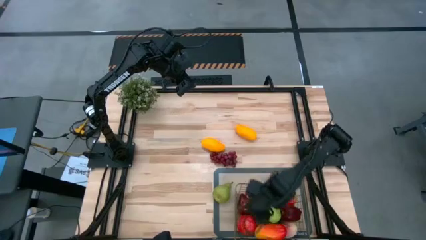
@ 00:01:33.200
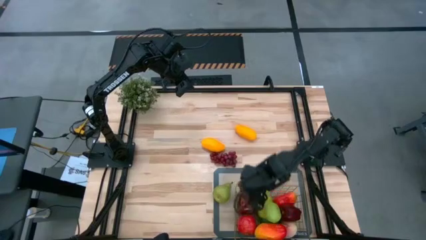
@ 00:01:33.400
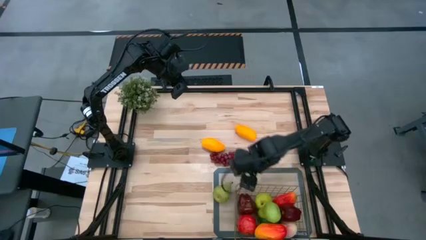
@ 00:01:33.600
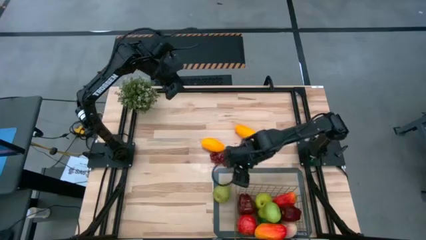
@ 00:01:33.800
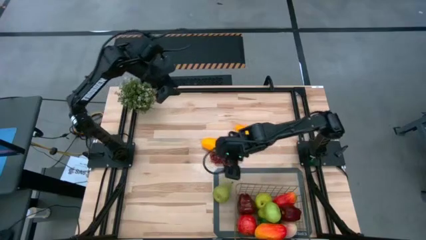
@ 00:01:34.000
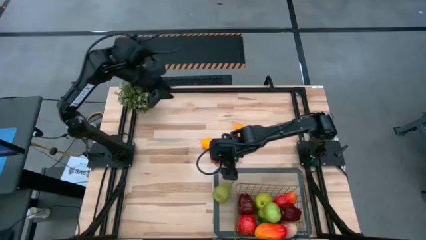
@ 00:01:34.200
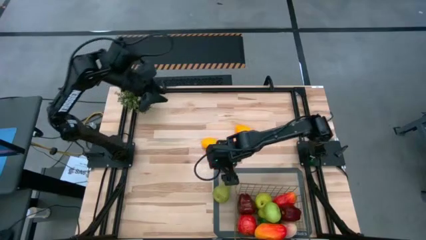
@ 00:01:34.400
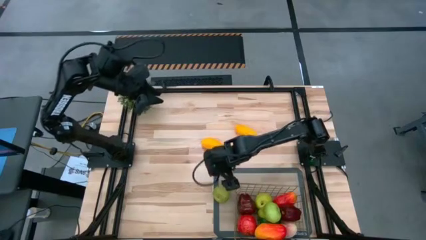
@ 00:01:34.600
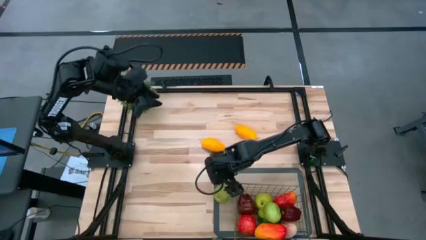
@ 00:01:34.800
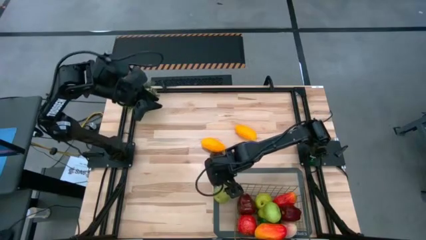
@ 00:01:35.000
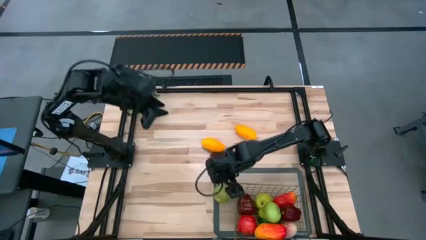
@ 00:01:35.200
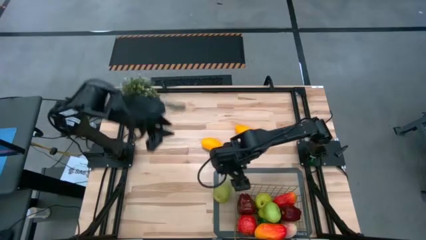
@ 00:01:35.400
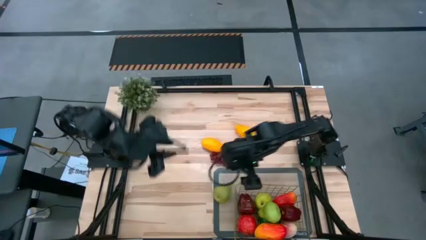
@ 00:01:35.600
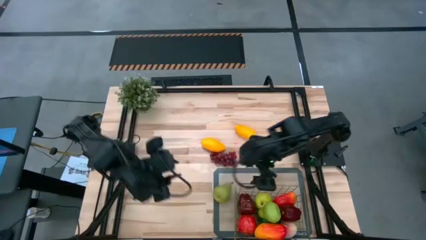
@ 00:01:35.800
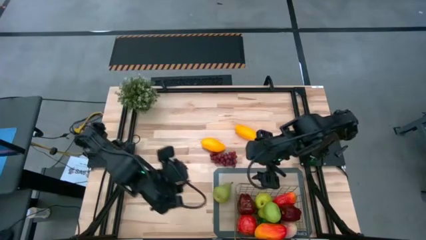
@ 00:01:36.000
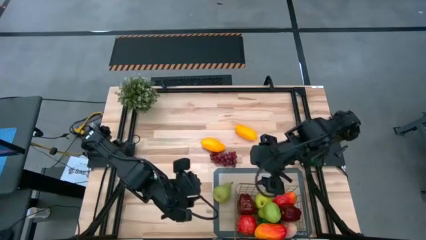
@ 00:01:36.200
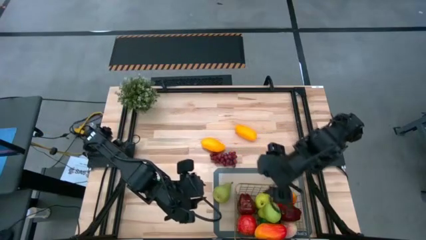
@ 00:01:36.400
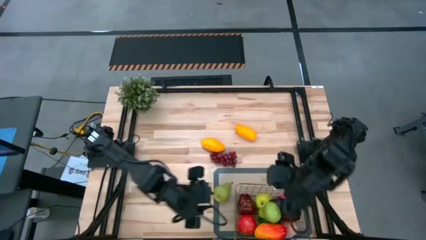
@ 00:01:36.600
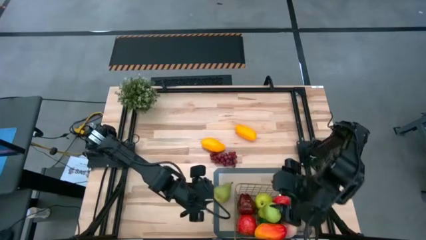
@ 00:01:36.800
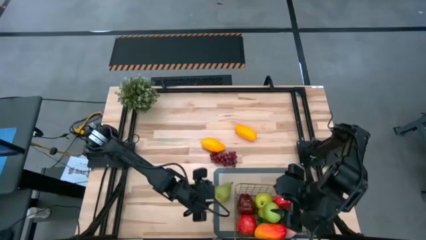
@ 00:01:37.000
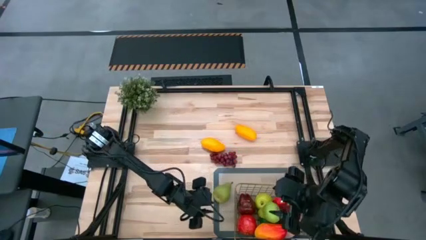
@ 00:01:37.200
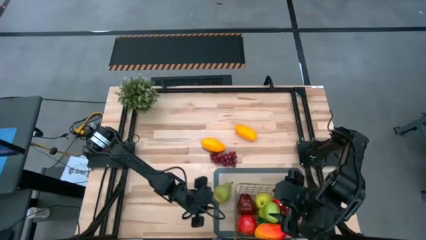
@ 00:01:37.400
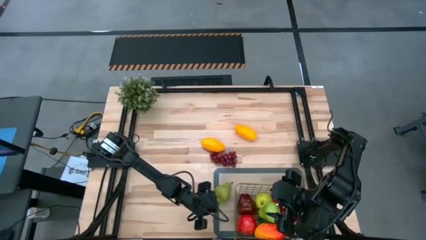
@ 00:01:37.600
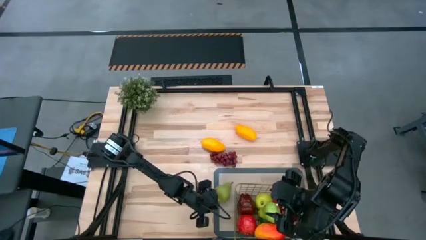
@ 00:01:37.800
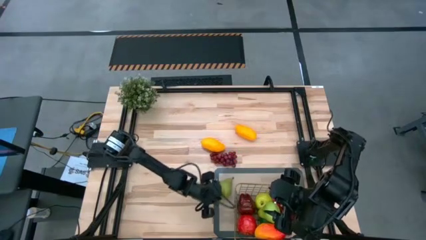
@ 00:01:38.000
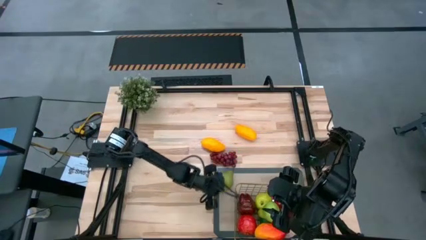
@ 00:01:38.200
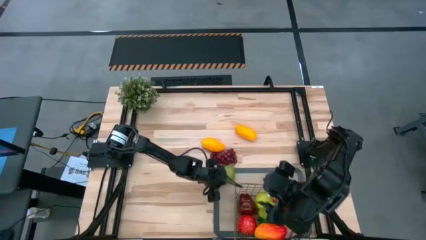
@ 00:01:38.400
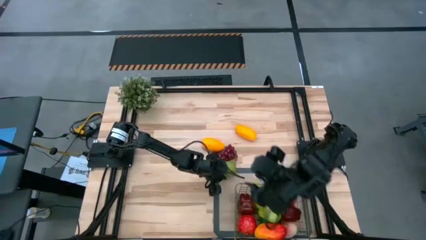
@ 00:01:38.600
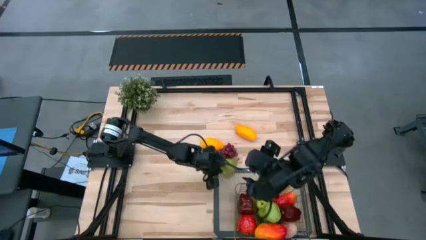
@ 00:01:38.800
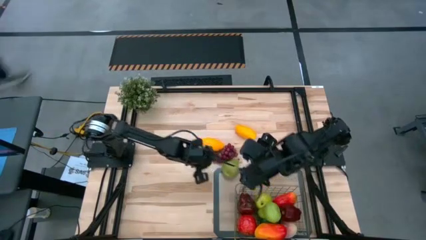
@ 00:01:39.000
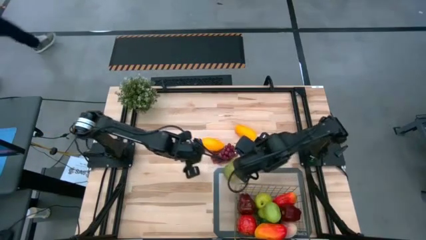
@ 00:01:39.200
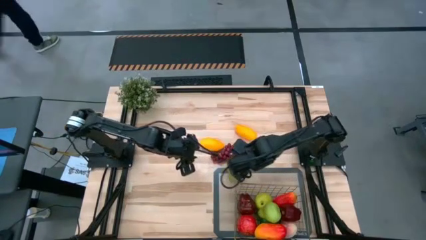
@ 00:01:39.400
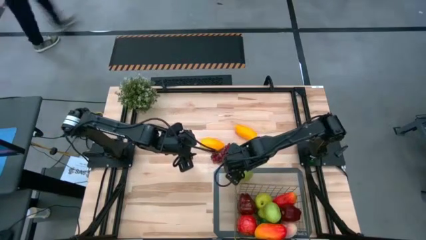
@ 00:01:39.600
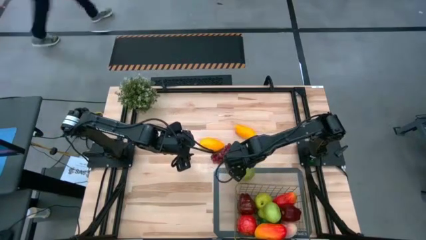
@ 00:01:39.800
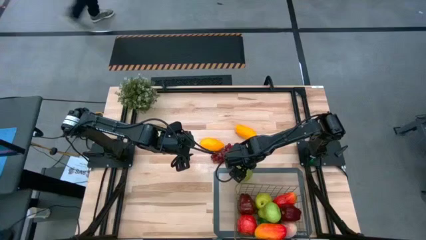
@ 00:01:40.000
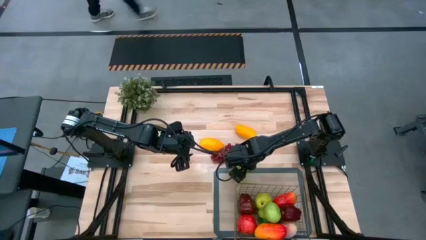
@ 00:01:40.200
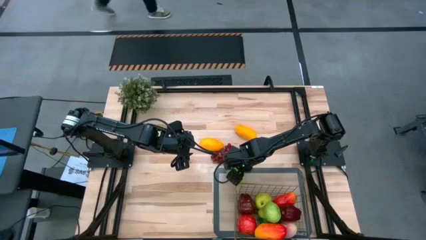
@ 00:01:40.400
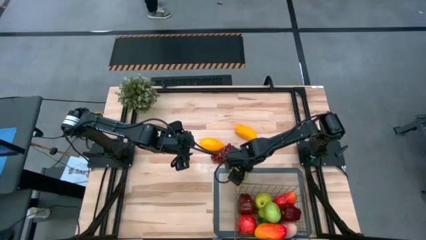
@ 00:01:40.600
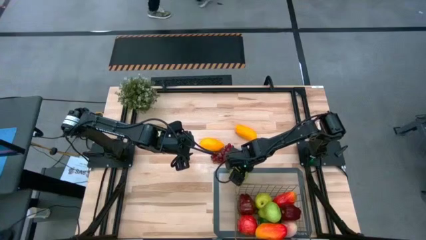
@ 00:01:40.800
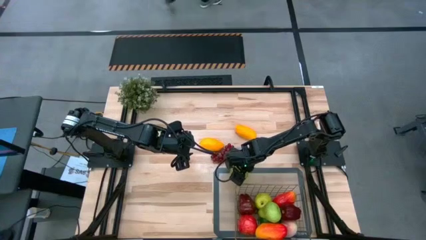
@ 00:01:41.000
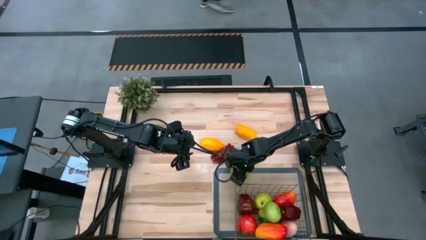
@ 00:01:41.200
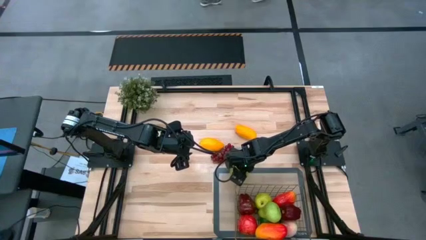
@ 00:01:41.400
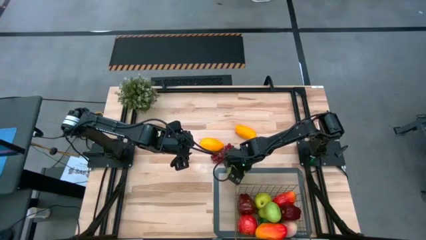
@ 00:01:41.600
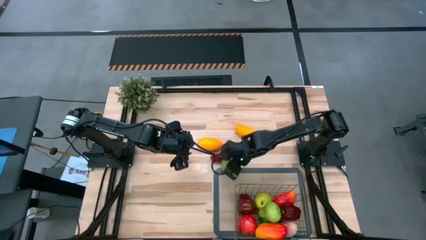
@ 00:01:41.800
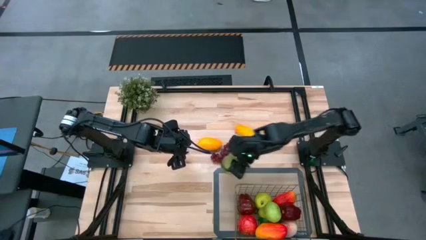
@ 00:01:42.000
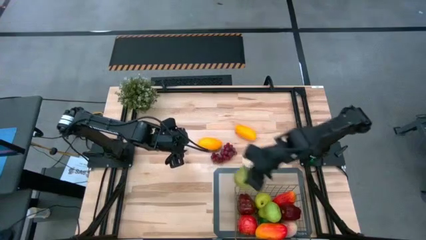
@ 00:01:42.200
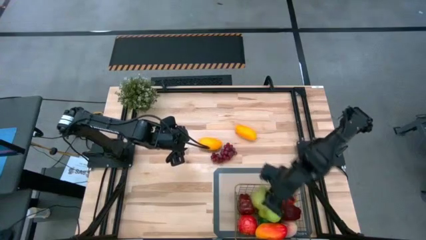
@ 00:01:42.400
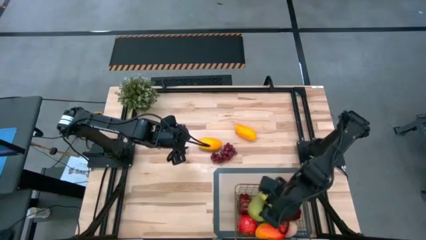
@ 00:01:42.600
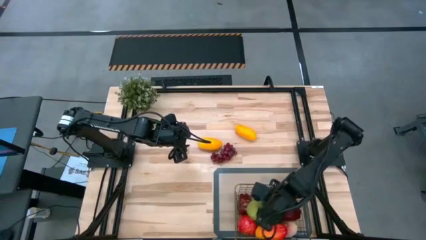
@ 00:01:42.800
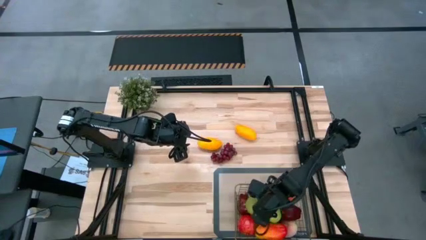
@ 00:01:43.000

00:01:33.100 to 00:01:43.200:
Task: Build produce basket
Put the pear into the wire basket

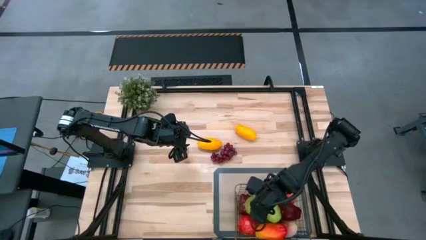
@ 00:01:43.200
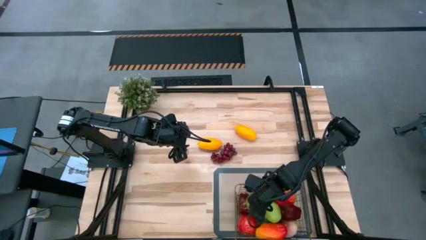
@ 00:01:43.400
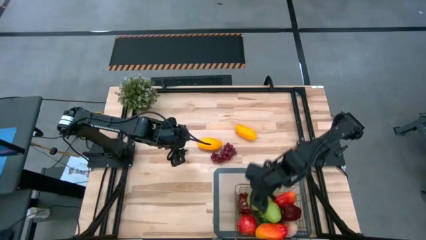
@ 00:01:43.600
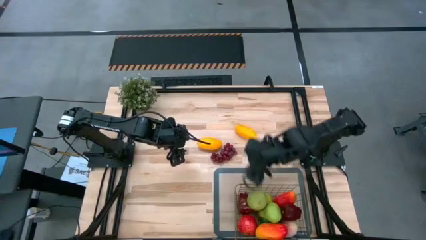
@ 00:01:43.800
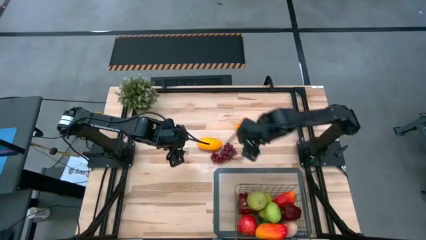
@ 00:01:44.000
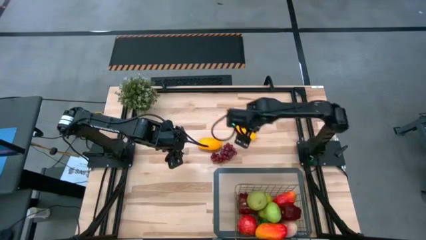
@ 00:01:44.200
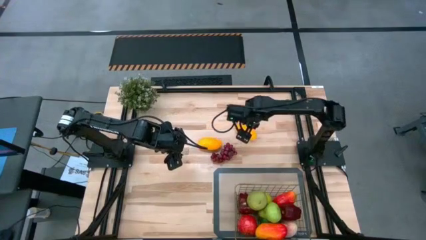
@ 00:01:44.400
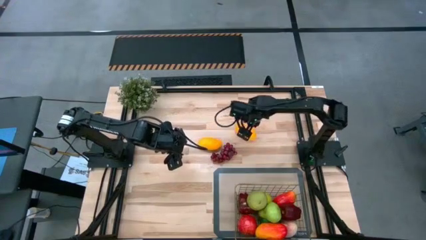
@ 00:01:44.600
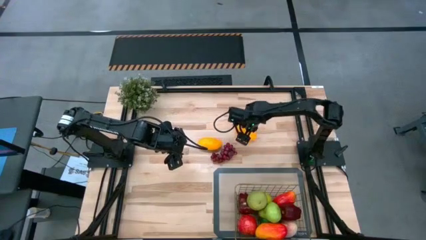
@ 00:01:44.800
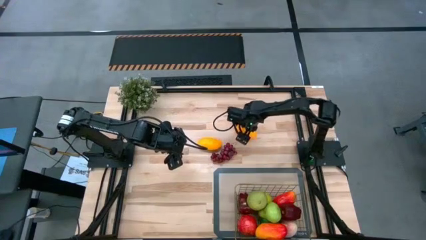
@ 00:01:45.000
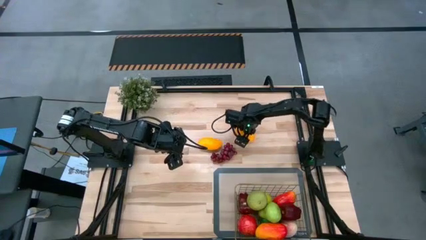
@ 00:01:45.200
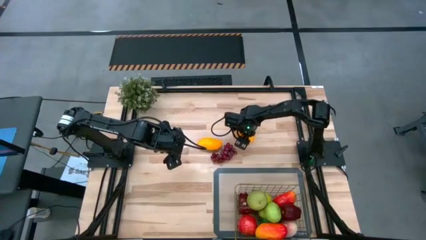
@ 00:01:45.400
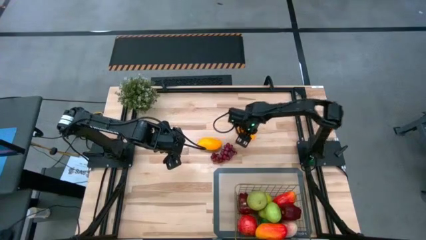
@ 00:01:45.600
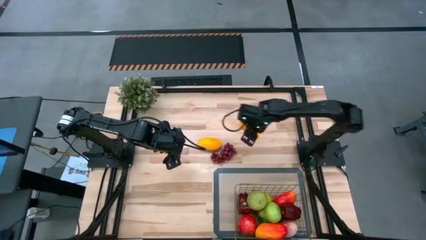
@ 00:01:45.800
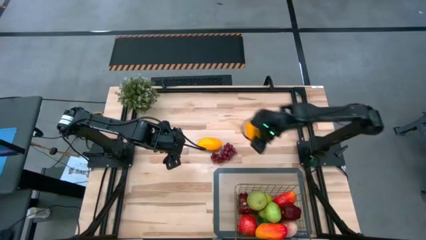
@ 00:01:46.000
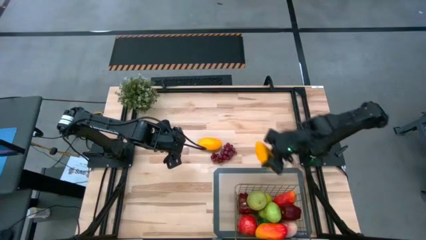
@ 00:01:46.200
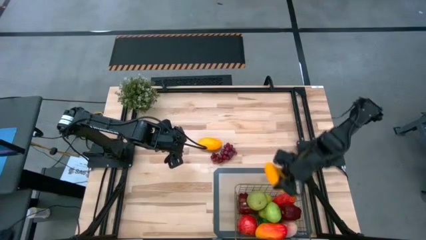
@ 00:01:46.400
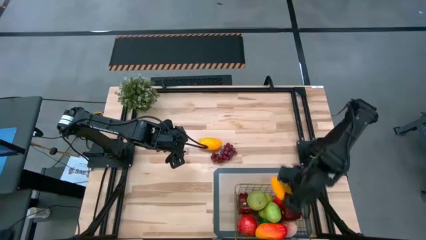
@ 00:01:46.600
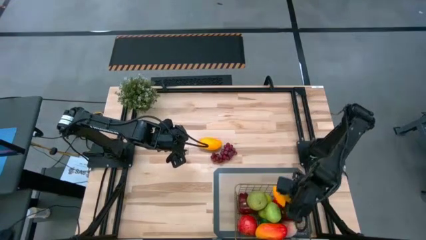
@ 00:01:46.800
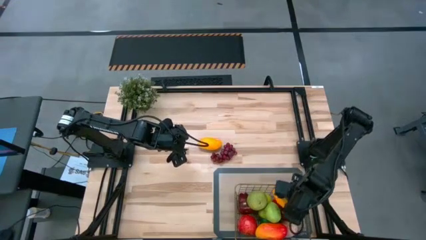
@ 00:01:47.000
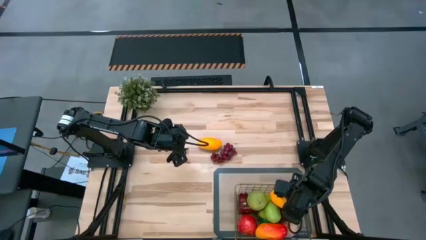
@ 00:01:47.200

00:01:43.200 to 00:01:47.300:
Put the right yellow mango into the wire basket

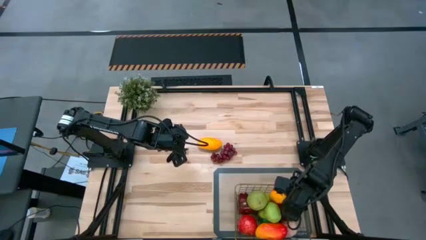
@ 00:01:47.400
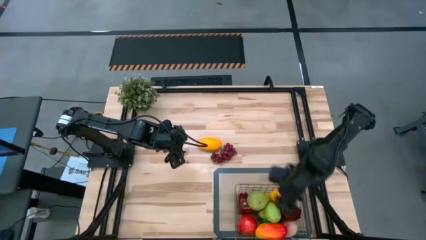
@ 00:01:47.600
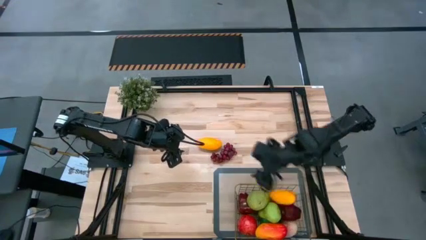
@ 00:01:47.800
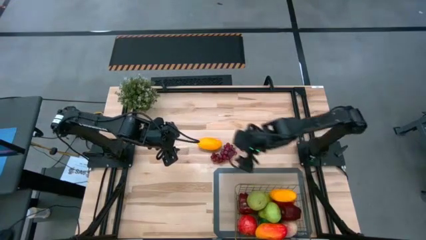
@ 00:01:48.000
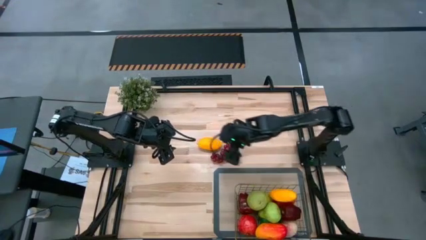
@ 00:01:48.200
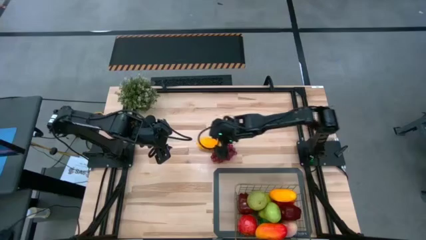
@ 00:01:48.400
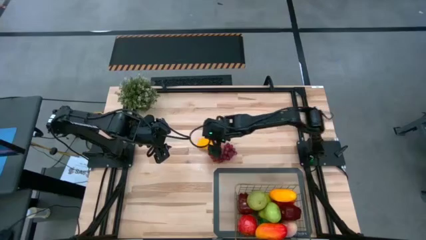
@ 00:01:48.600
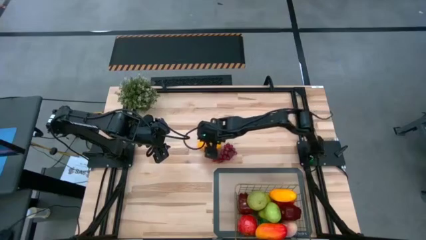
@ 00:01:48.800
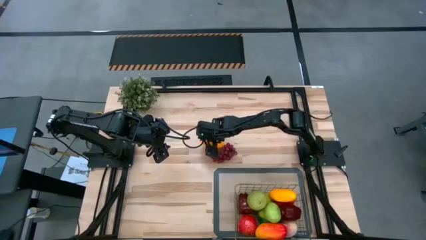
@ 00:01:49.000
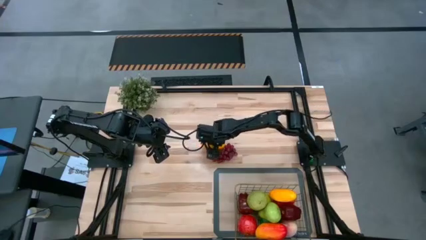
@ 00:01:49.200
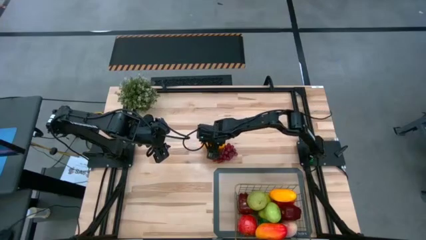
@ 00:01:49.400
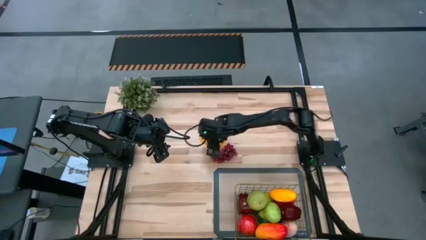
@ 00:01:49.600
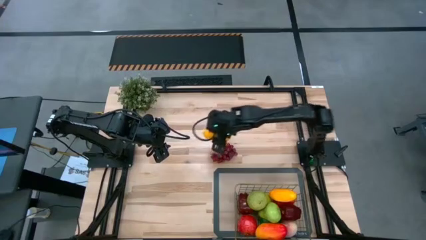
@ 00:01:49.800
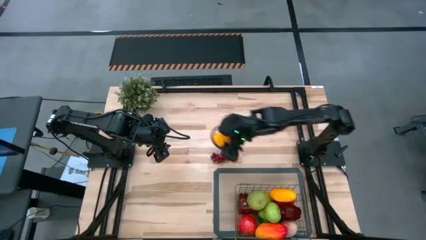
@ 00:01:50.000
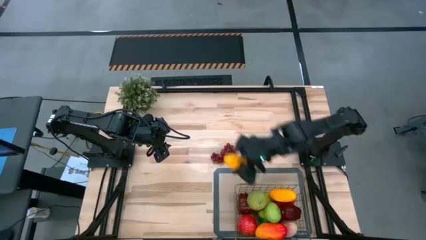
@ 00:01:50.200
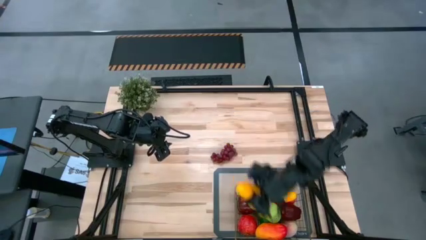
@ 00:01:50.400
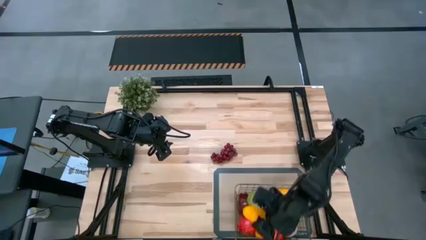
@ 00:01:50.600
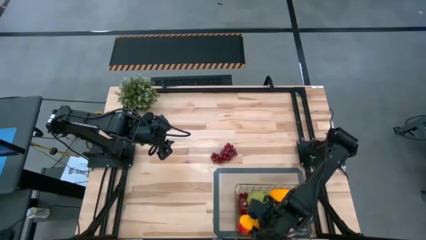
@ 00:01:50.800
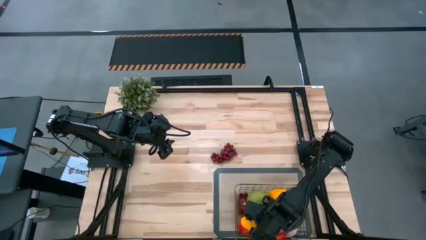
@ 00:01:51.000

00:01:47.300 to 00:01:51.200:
Put the yellow mango into the wire basket
